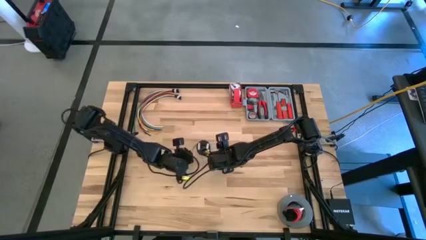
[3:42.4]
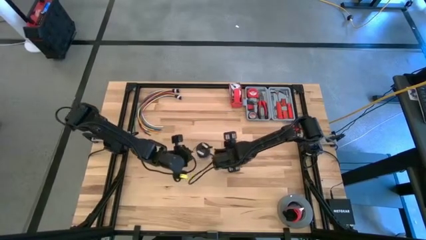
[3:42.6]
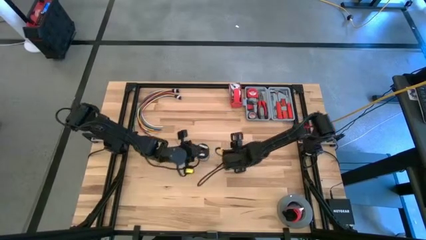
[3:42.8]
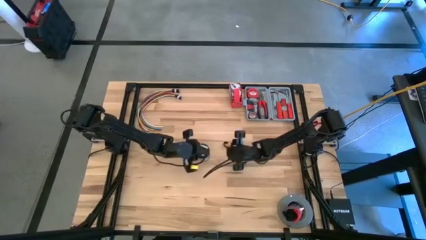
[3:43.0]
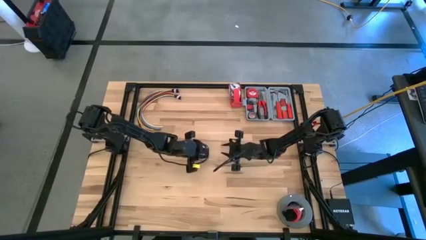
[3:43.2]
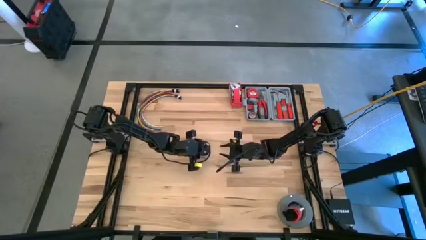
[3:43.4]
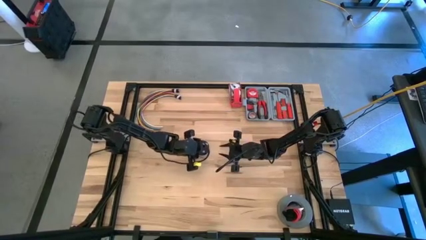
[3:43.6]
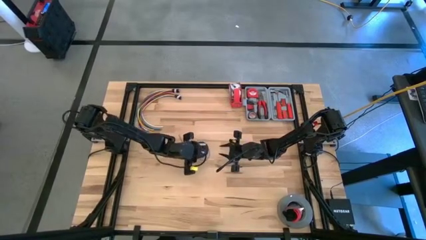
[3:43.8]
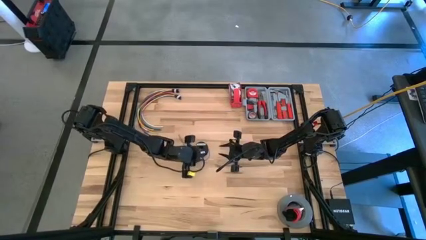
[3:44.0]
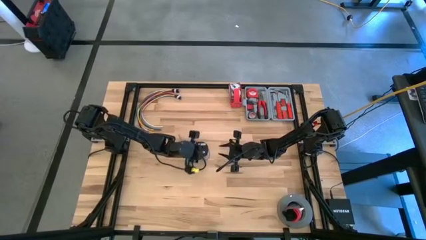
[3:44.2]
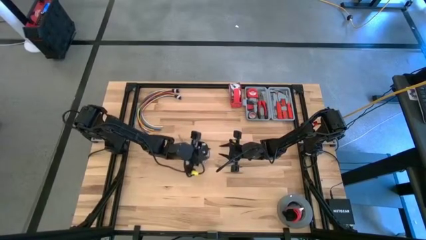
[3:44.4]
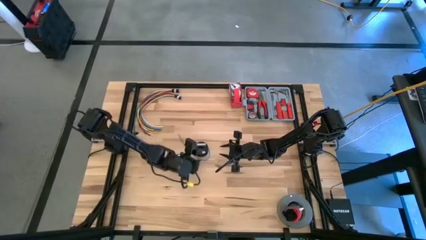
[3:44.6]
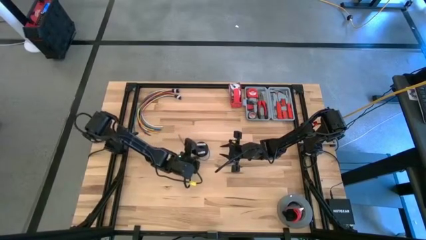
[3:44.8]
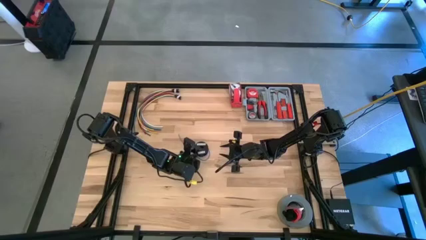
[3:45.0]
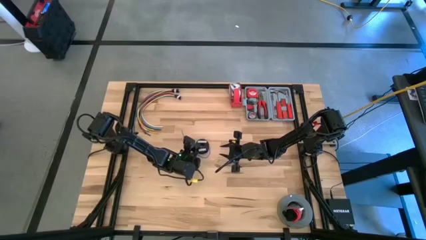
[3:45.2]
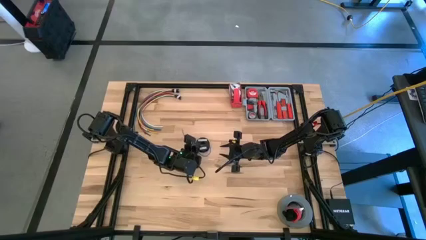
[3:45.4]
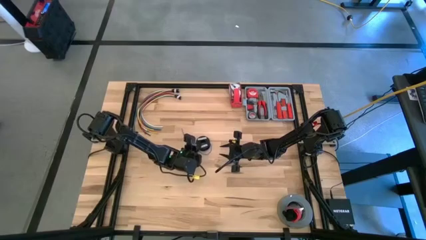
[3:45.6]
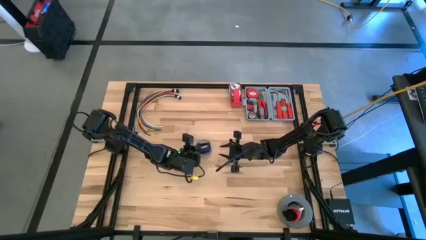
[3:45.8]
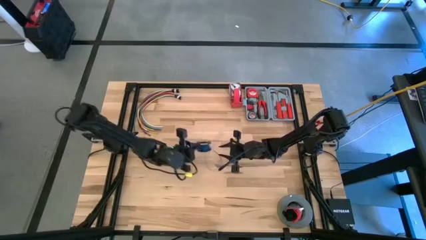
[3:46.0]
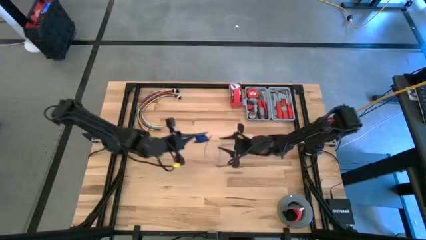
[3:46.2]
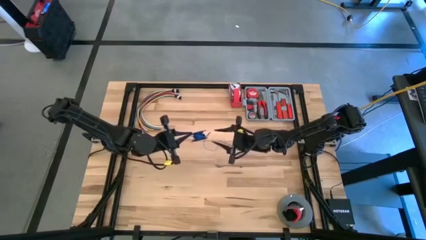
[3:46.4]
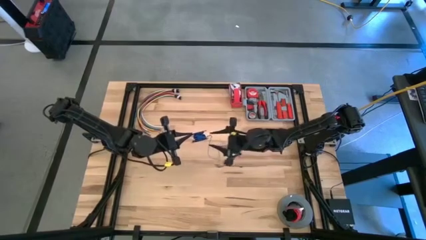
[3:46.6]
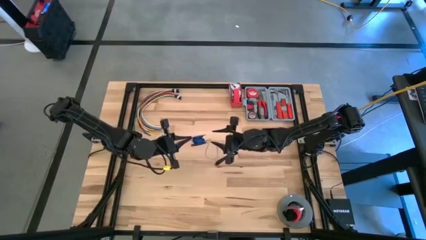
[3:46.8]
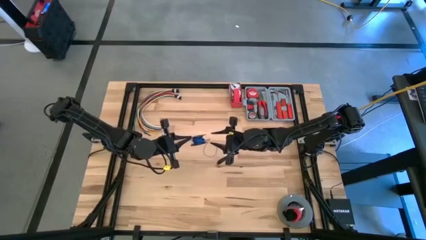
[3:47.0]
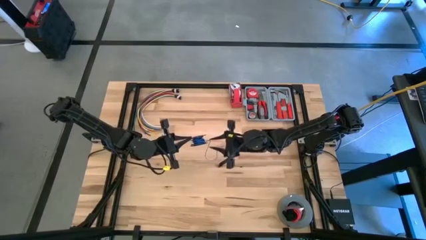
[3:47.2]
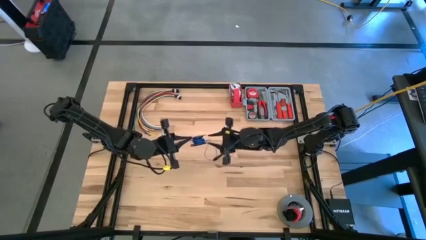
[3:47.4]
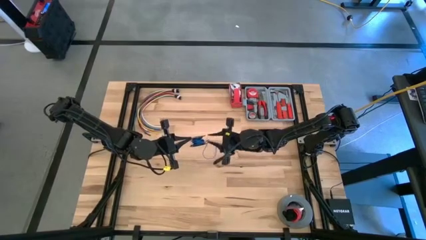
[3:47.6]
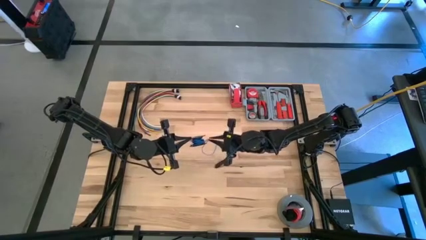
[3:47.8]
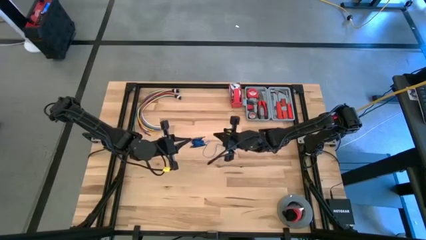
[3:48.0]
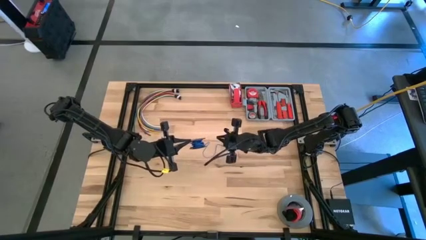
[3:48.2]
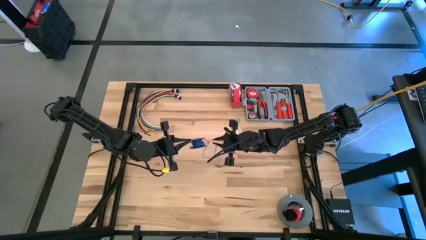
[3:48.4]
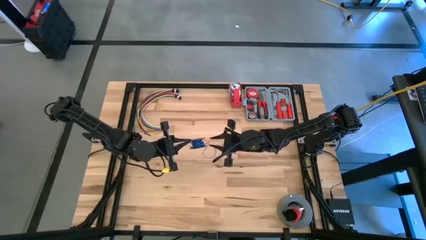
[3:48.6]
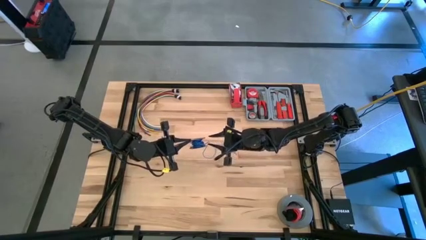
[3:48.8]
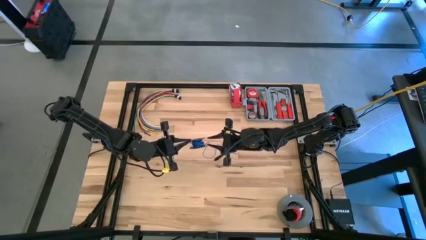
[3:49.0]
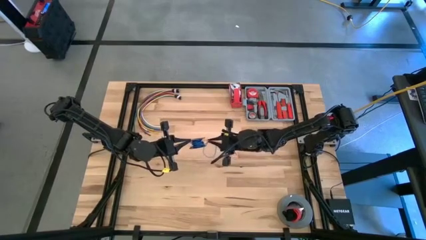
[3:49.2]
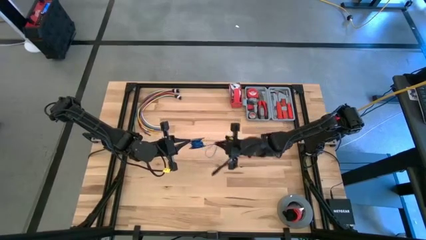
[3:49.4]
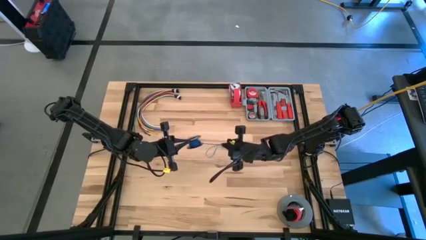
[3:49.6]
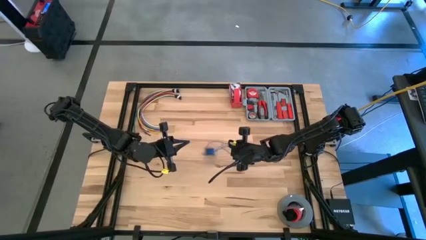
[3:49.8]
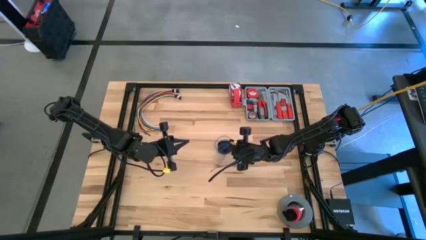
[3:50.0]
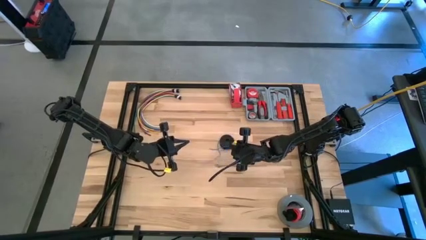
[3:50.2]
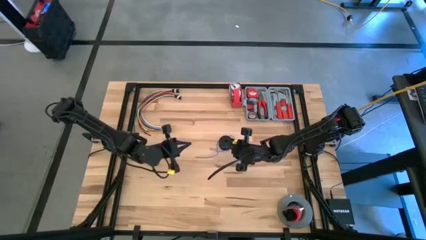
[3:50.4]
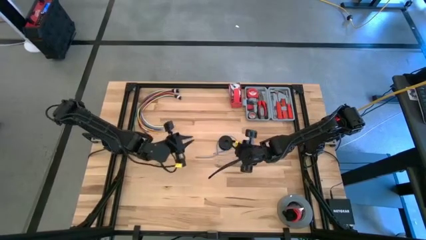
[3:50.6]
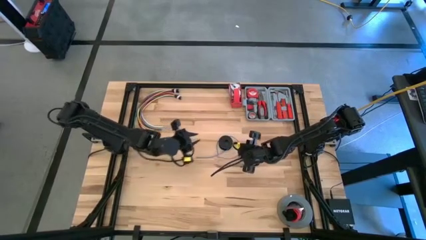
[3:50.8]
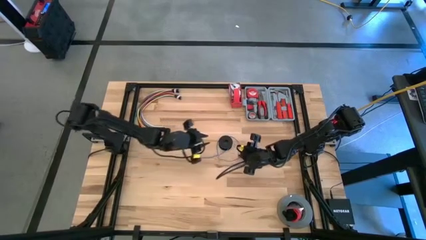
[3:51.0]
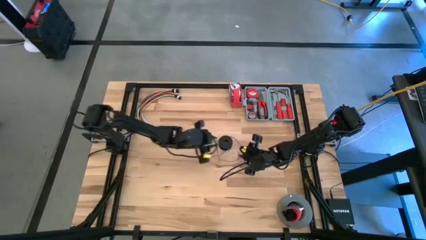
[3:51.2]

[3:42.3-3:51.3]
Task: Coil cords
Uncoil the blue wire from the black spool

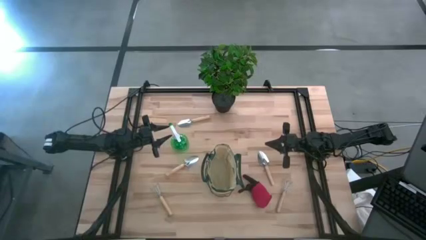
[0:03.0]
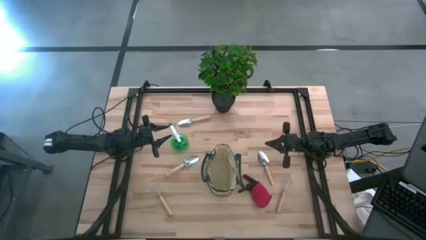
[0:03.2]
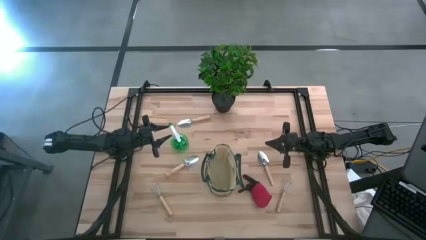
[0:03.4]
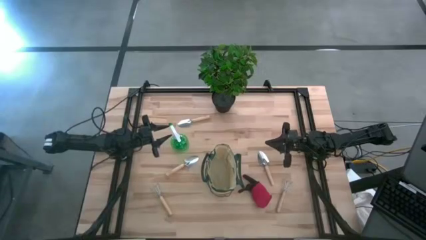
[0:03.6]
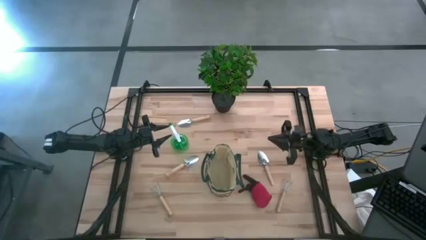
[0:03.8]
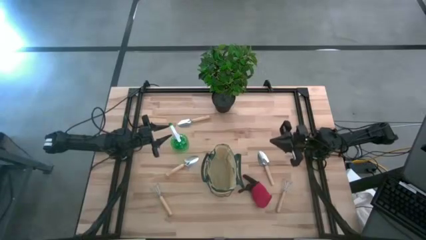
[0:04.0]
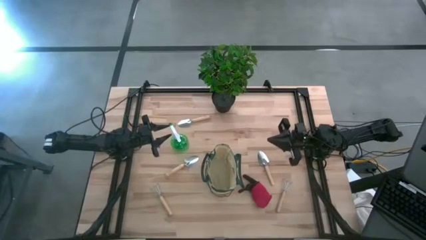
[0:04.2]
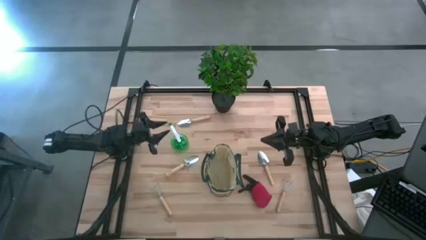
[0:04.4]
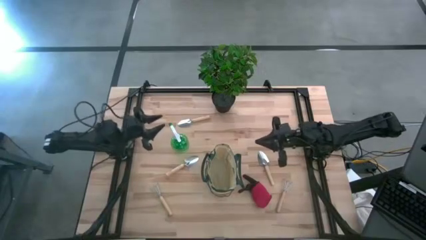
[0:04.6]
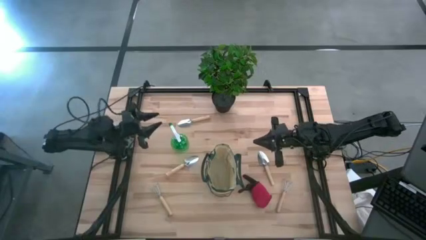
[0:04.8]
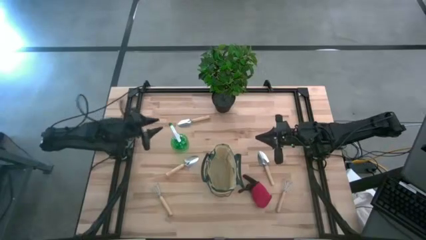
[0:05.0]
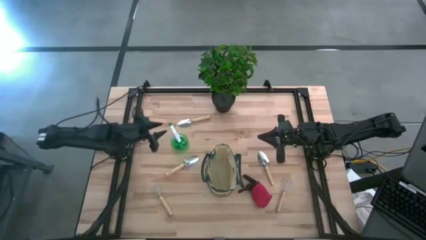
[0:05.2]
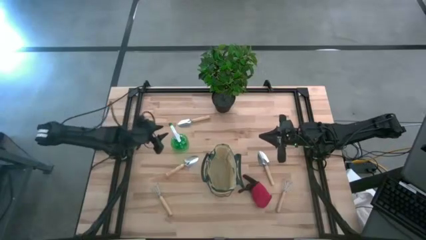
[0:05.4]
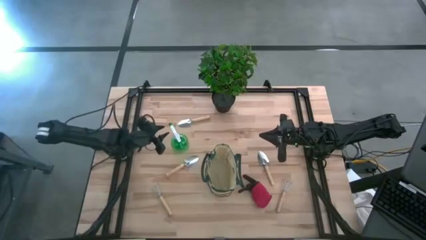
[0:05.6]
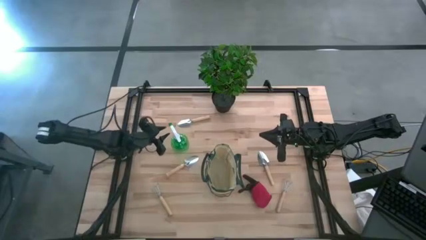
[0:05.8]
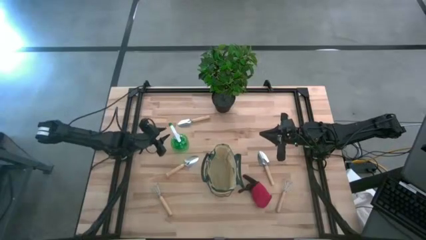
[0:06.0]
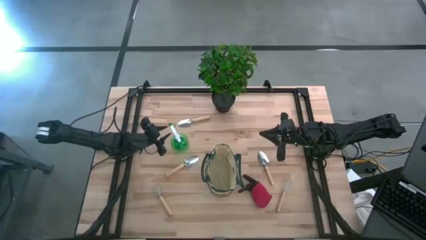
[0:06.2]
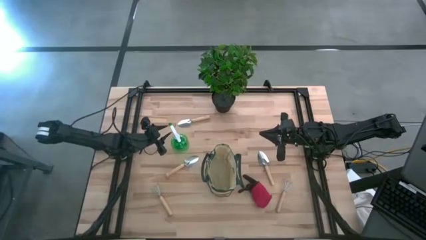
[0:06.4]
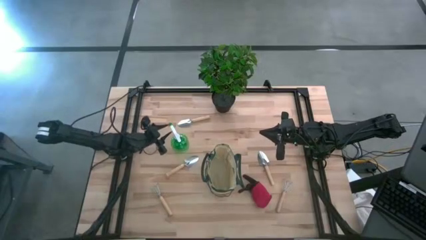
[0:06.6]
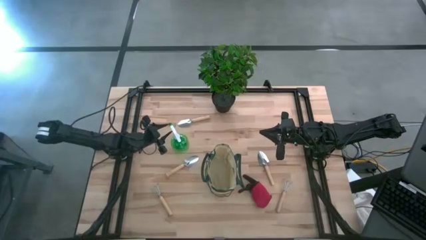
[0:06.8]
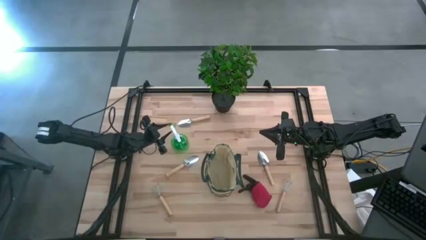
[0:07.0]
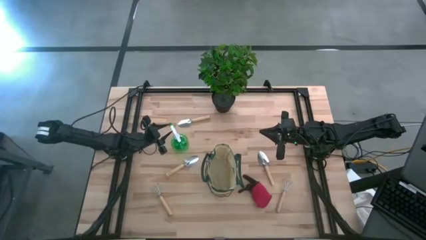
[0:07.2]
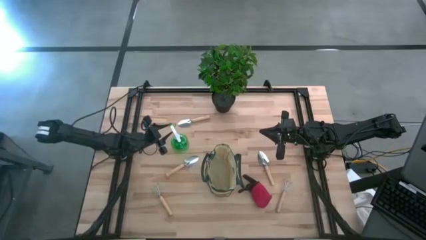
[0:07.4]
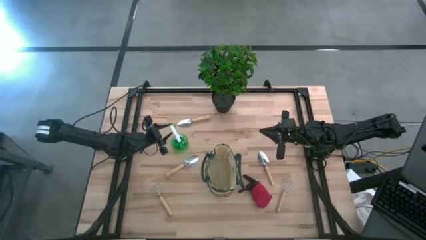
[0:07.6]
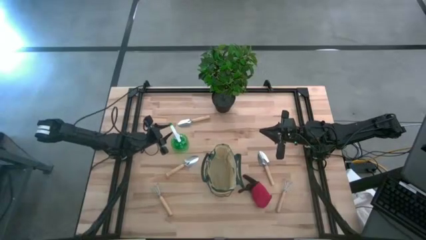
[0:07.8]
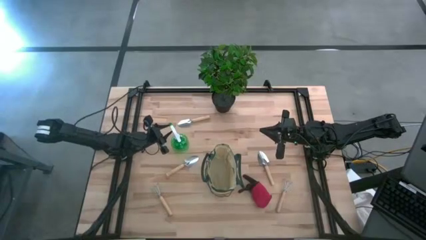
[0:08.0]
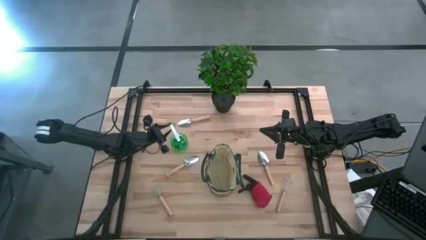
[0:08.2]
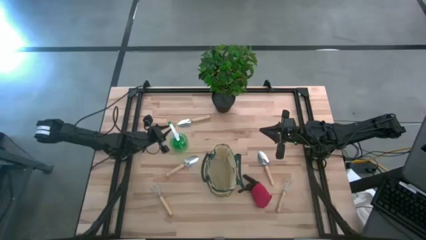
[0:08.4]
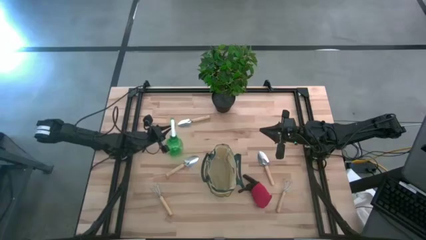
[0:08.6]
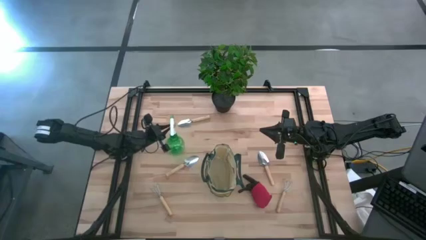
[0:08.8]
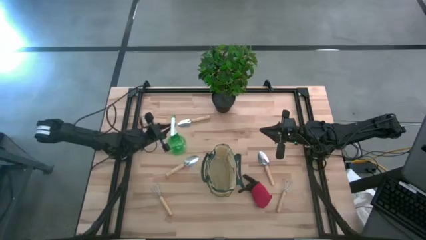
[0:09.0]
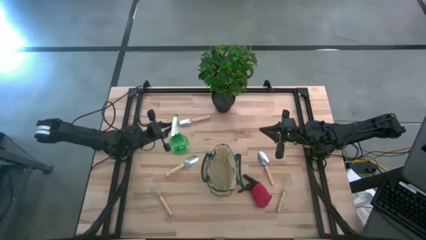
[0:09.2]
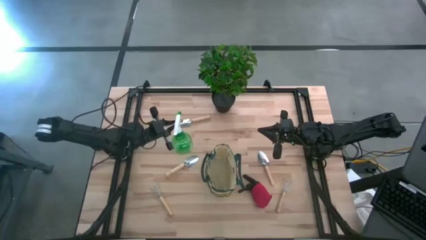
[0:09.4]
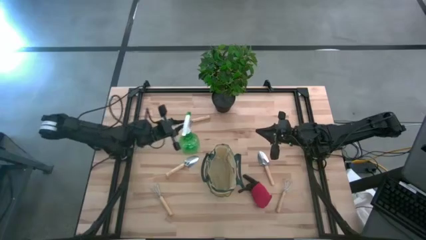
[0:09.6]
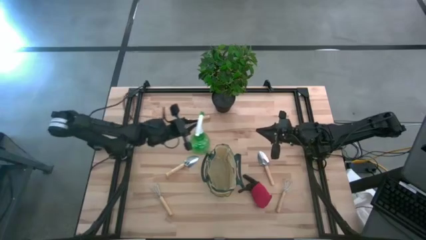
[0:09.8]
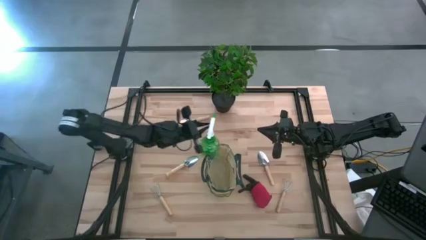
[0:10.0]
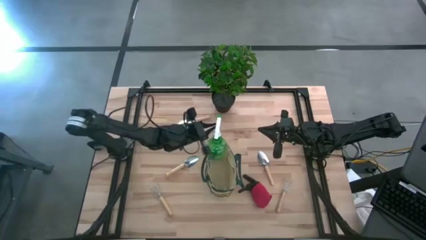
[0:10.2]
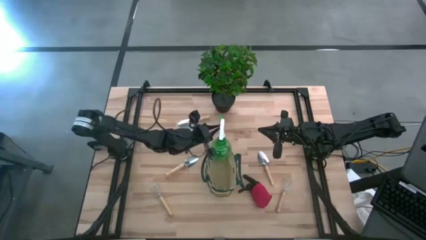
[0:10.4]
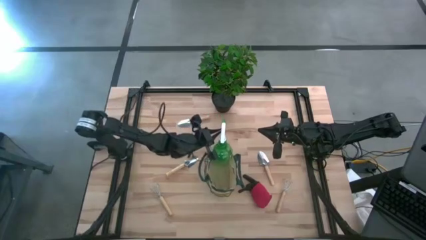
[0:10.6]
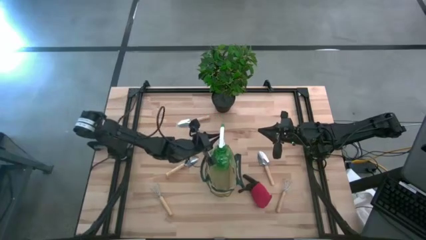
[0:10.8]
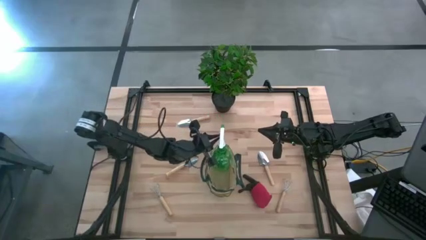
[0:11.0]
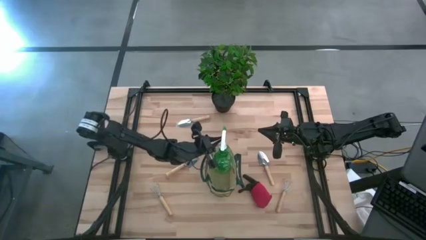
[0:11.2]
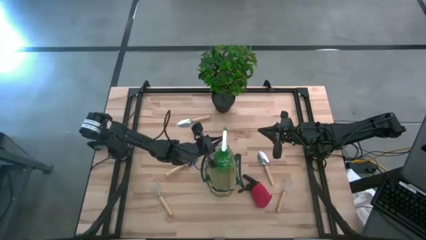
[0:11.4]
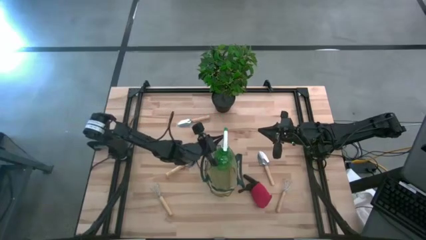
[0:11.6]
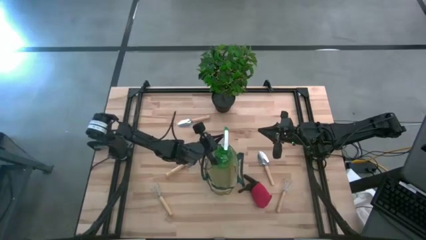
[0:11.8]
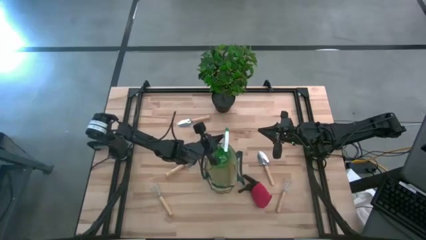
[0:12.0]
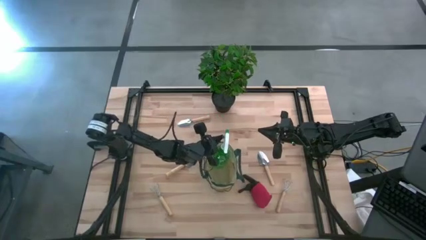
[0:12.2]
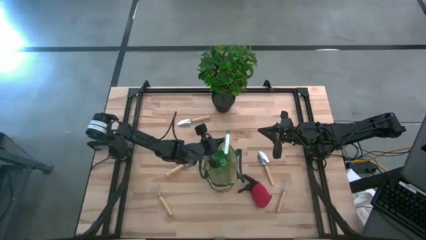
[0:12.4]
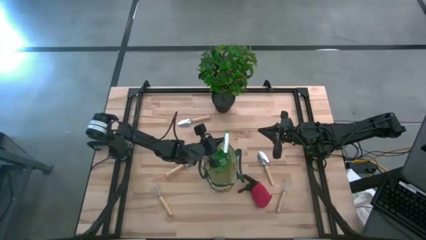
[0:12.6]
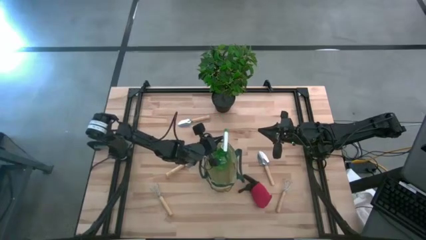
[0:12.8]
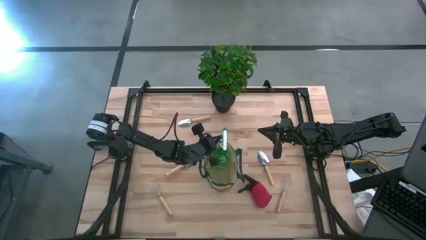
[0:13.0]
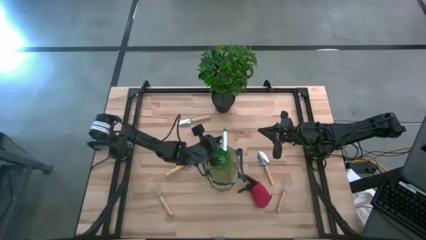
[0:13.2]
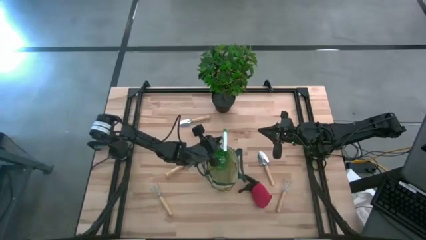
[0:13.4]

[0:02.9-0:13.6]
Task: Pick & Place Garden tools in Gardening bag
Put the green spray bottle into the green gardening bag
